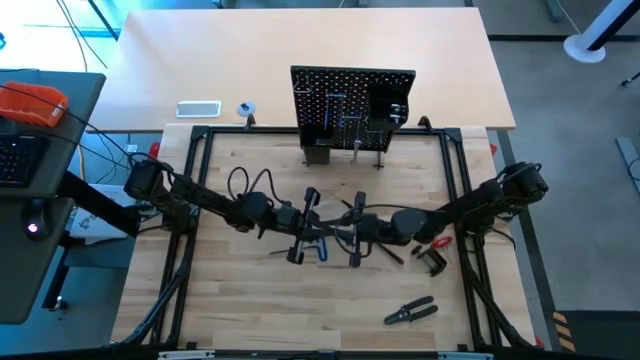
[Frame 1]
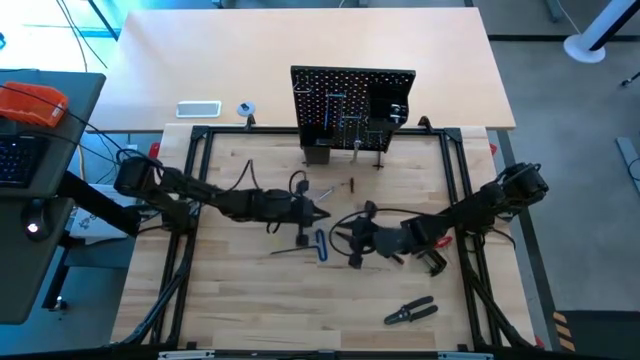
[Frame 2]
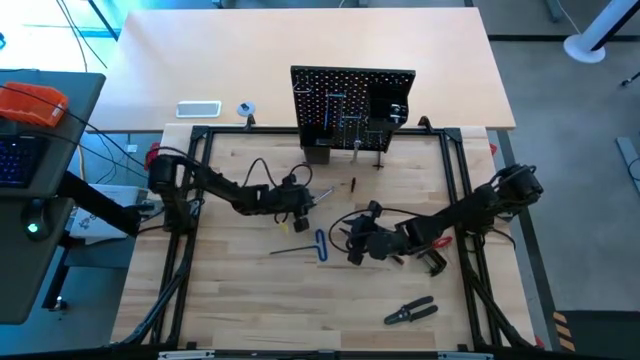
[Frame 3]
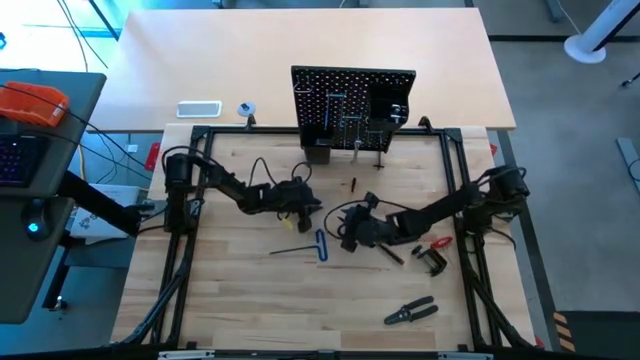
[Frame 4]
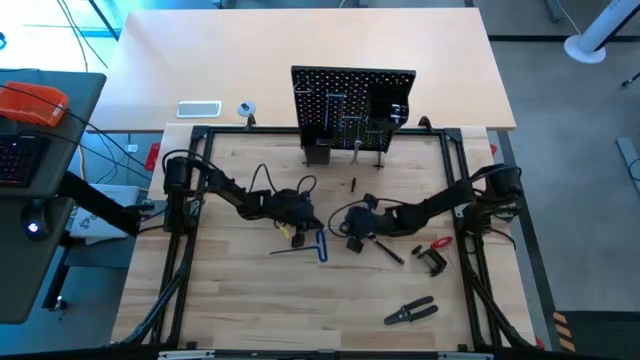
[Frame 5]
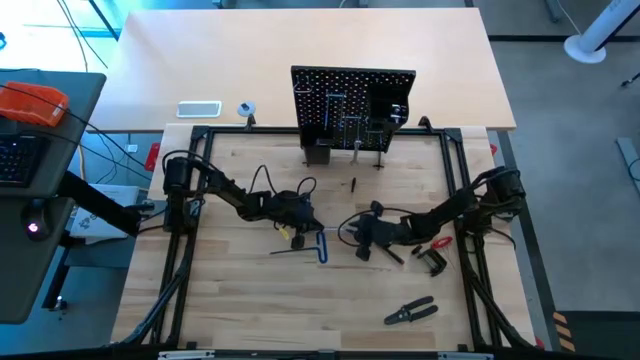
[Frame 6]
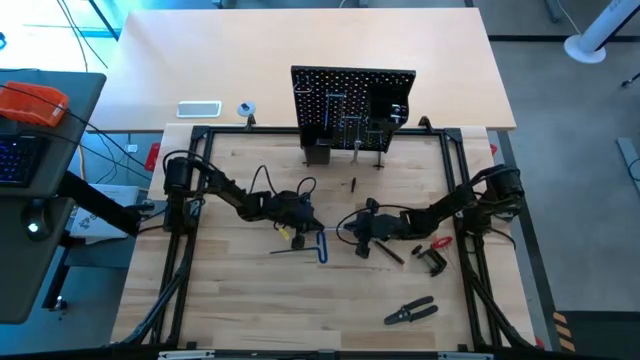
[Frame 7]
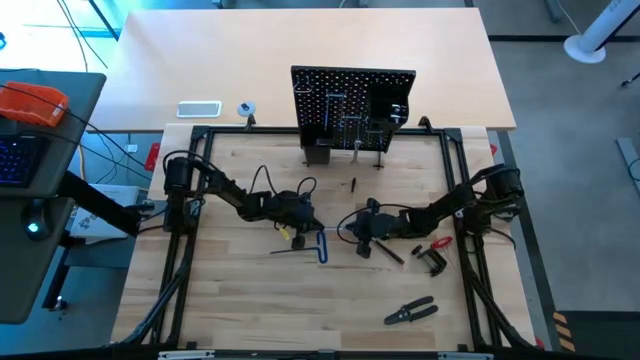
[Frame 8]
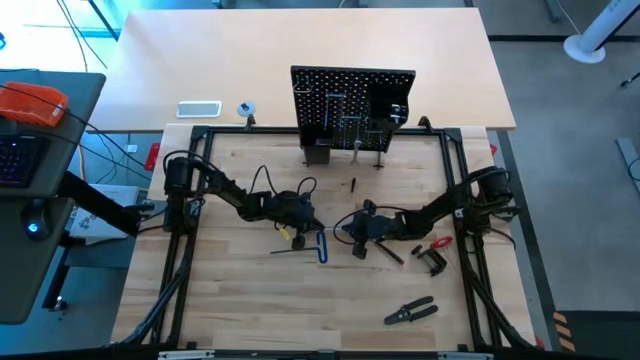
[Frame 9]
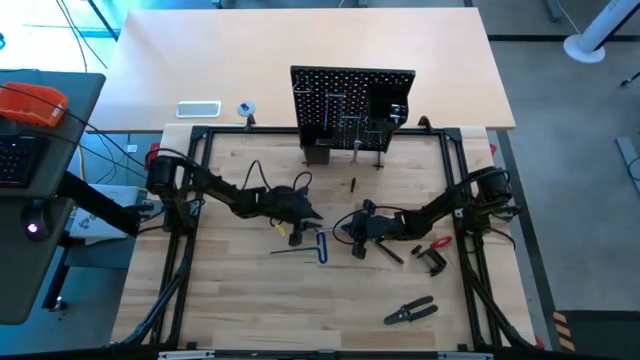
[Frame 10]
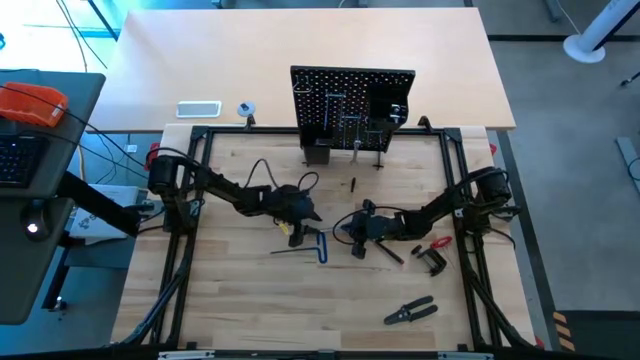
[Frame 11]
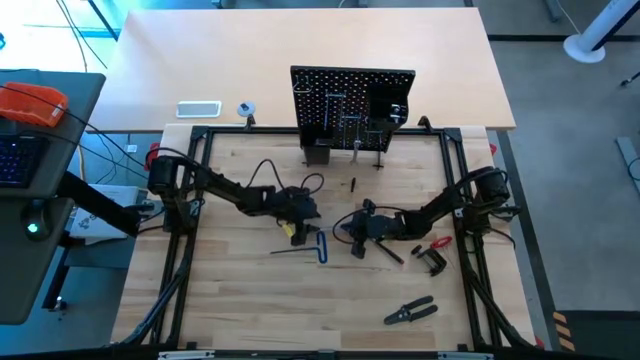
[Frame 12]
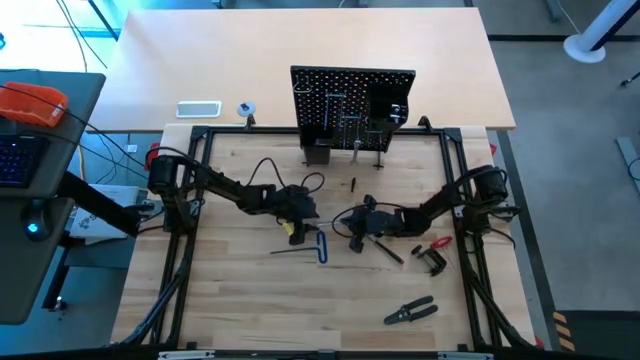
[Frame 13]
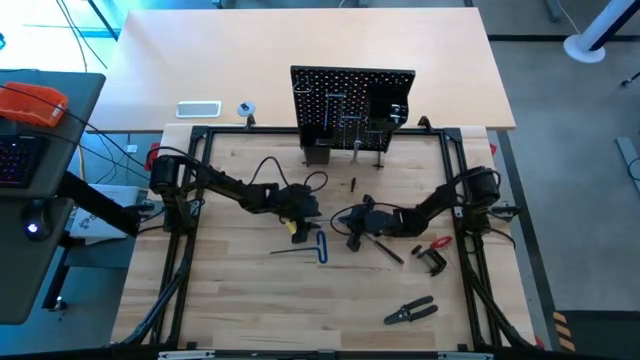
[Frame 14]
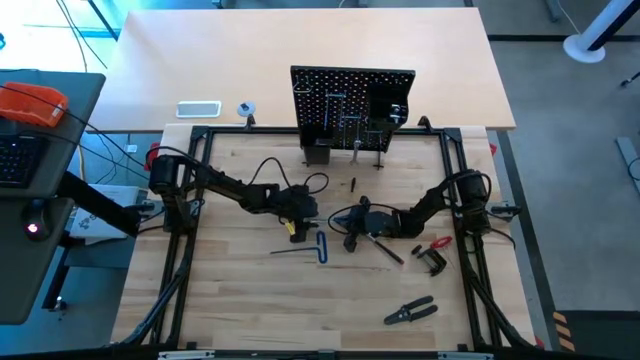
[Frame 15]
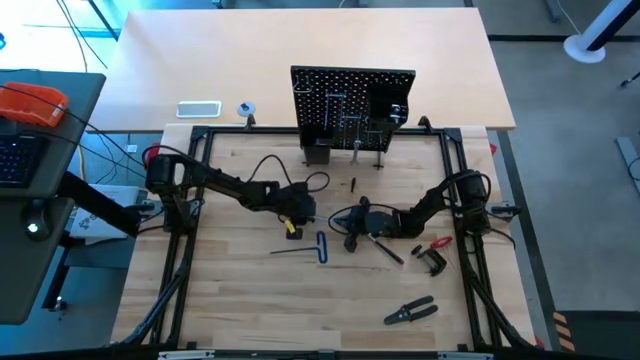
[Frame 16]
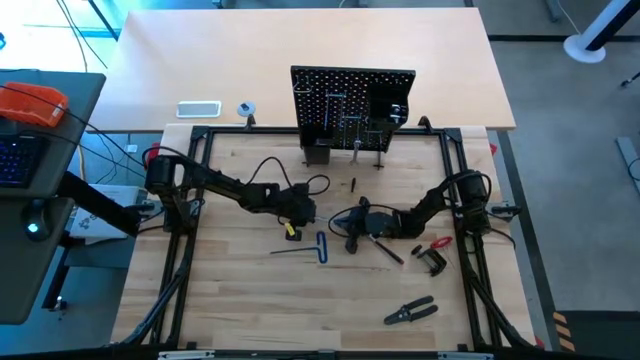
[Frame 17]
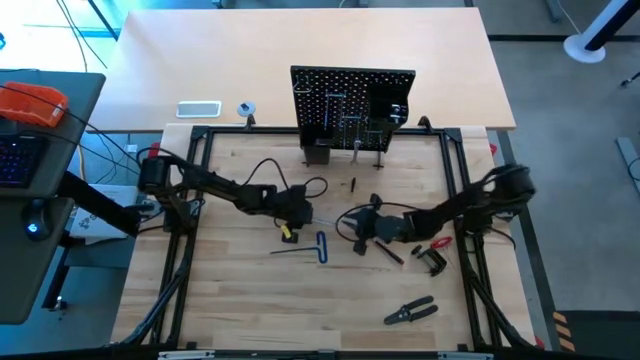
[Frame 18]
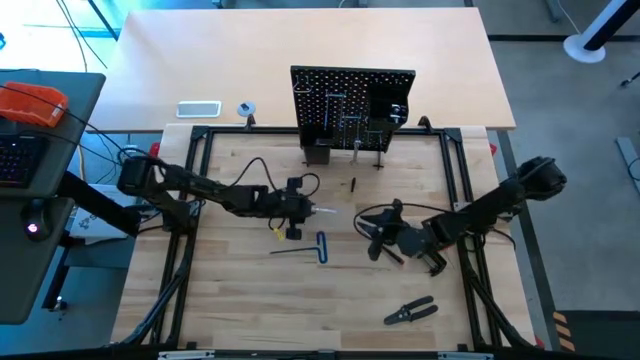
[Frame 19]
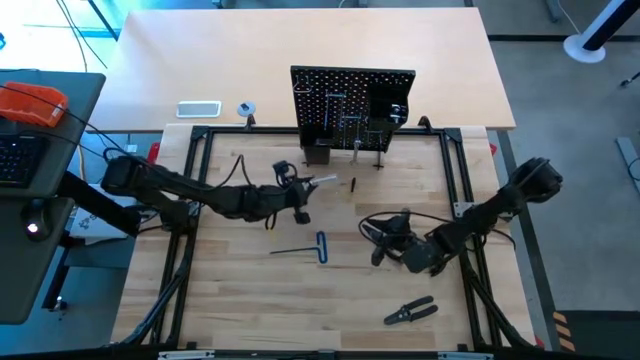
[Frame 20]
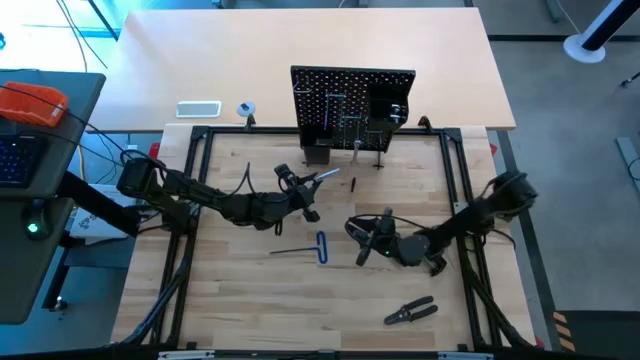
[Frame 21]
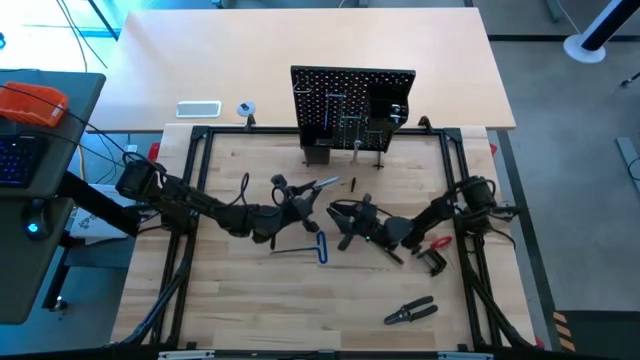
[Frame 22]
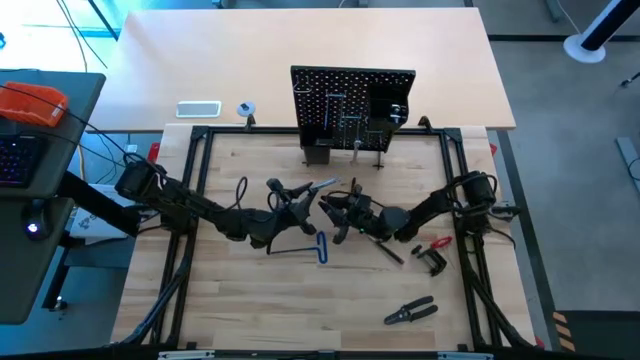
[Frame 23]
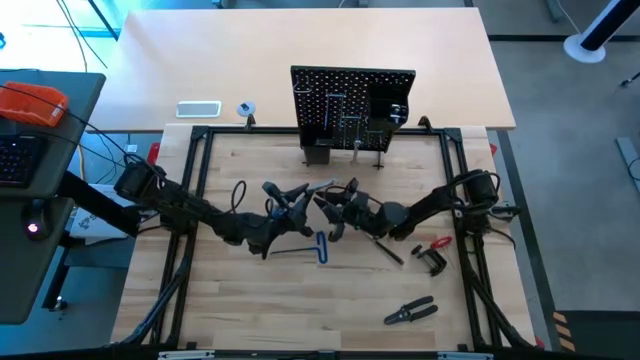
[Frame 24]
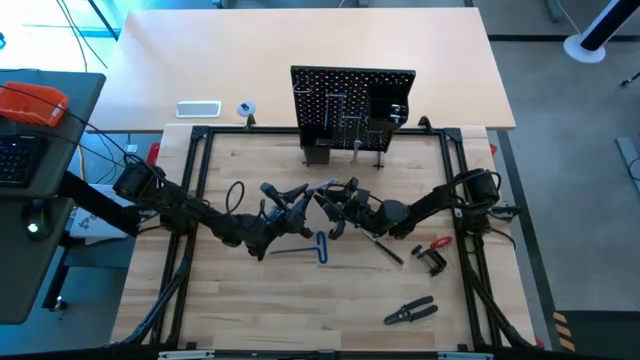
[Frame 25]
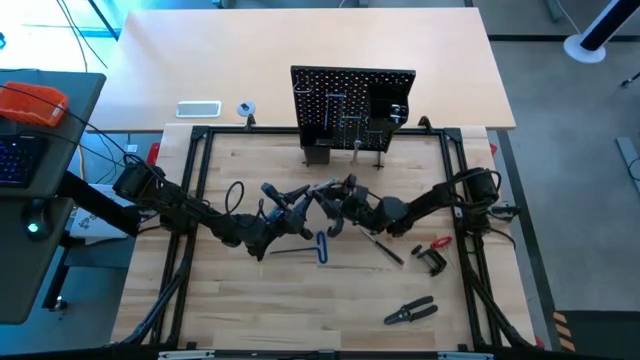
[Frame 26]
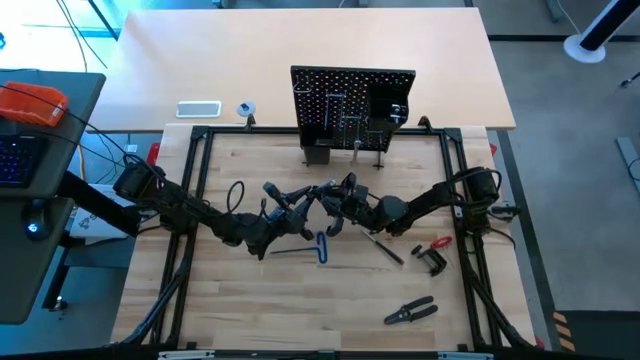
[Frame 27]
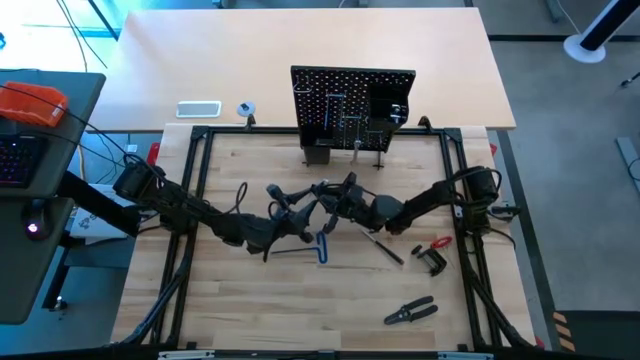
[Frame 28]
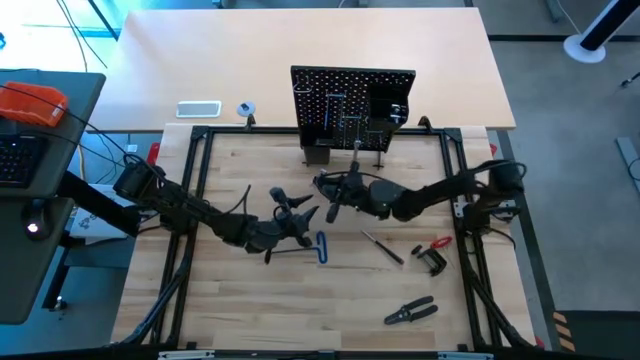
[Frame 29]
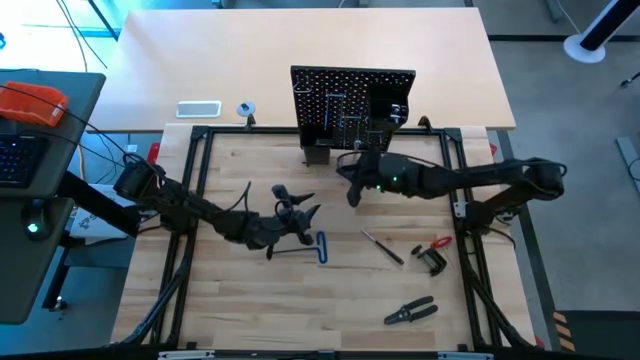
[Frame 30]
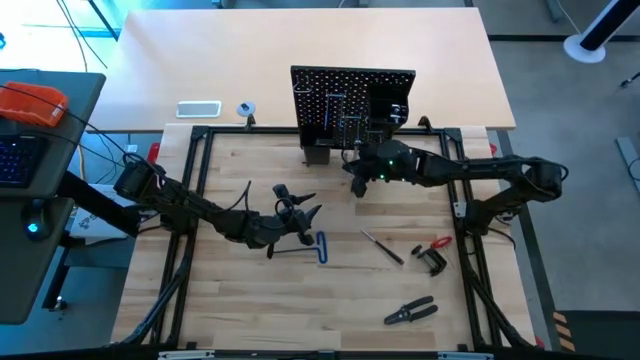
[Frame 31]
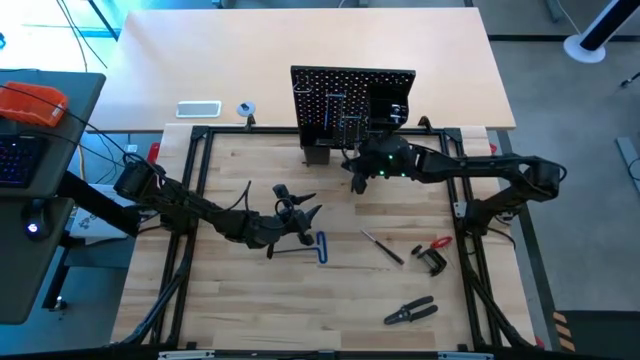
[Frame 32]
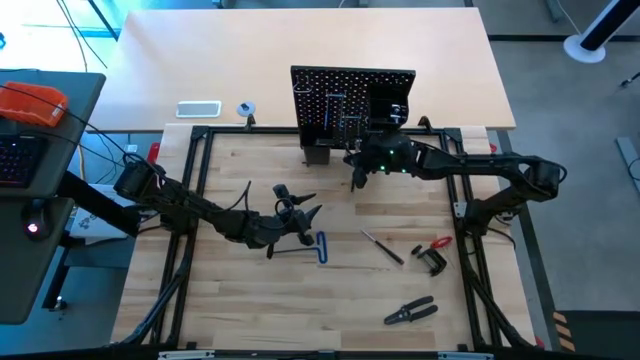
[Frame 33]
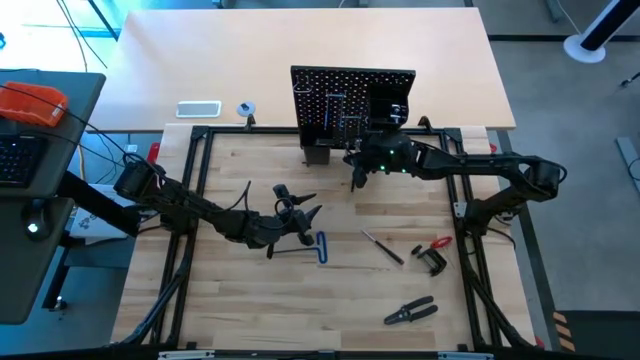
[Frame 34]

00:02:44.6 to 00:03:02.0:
Task: Hang tools onto peg board
Hang the wrench on the pegboard

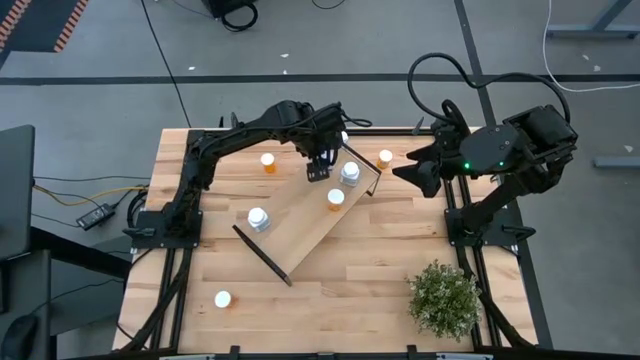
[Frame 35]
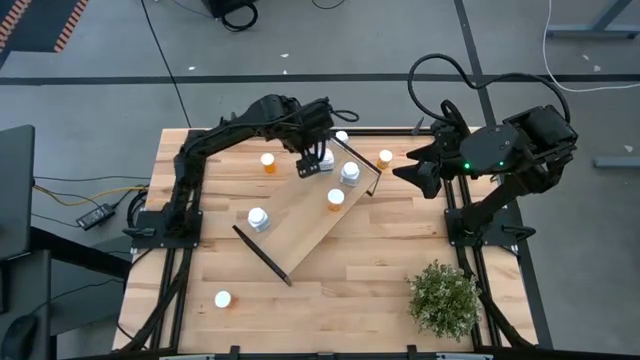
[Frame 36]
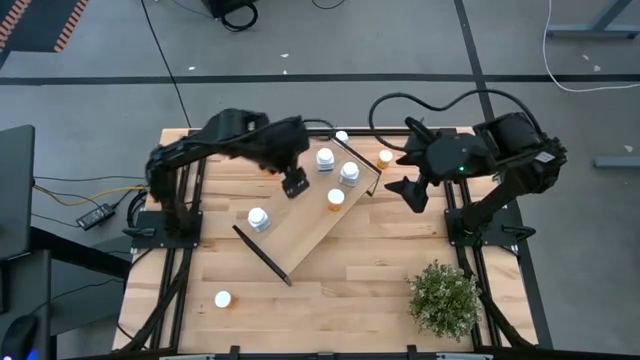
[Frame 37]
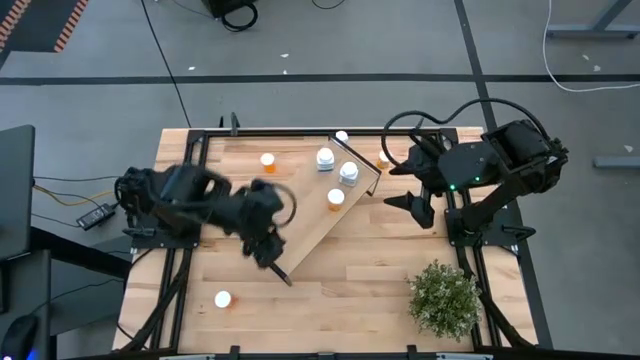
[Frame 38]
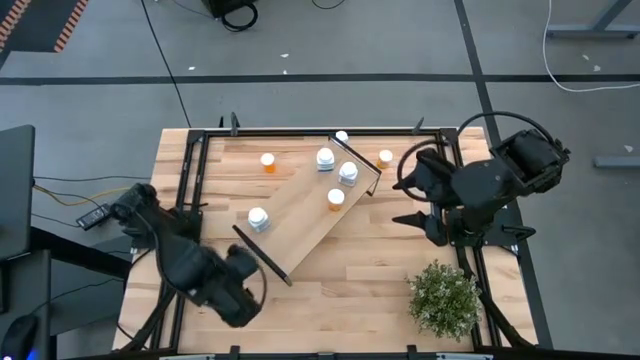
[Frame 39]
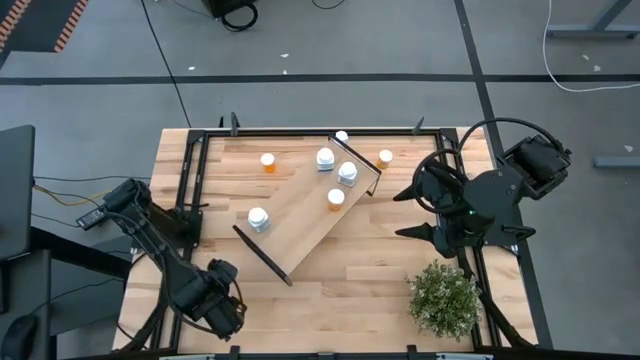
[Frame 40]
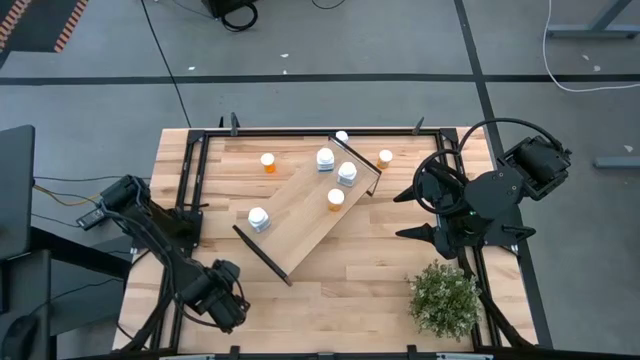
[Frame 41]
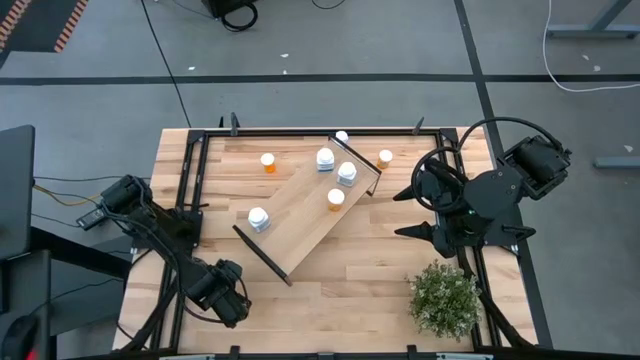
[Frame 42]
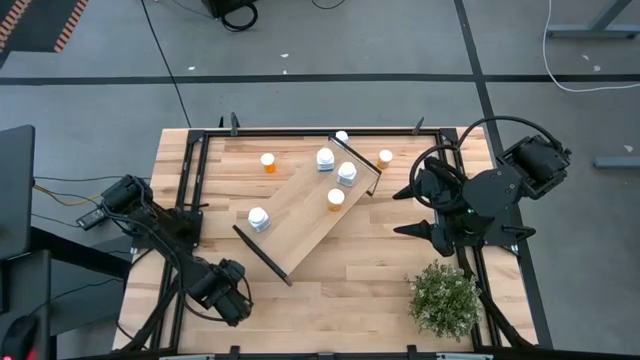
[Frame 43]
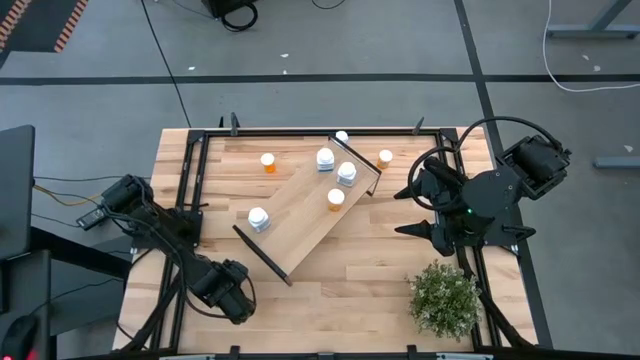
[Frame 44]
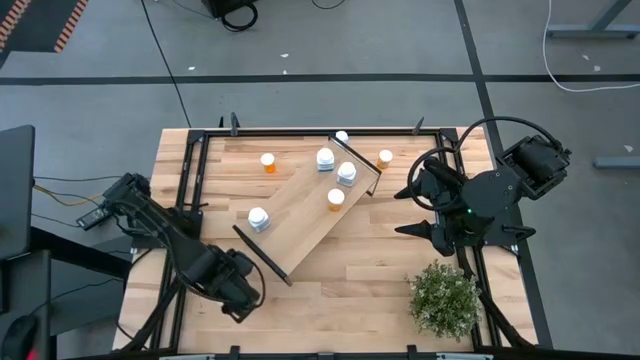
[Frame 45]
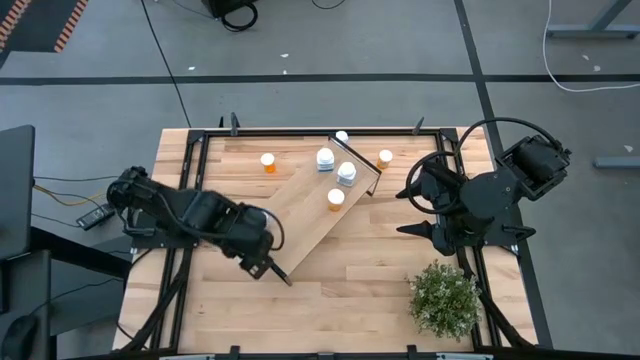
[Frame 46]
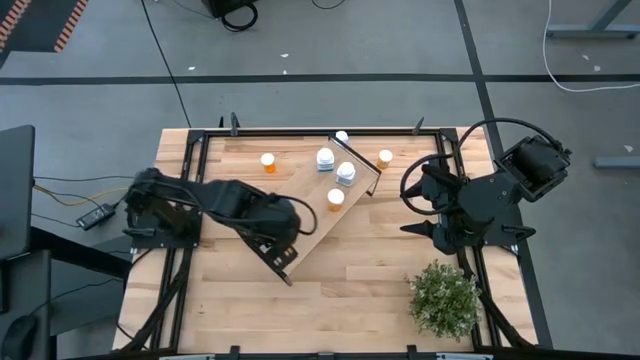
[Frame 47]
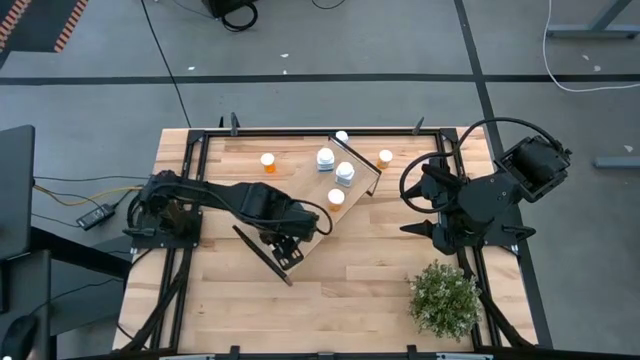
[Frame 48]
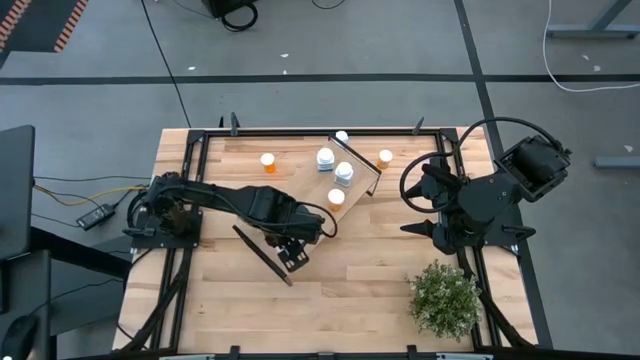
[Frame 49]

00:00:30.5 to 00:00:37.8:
Task: Pick and place medicine bottles onto shelf by color
Put the orange pill bottle on the shelf
